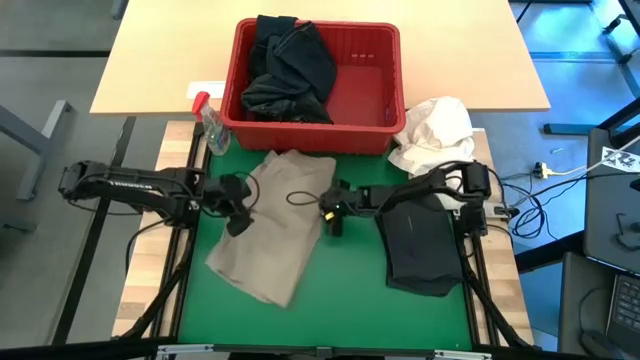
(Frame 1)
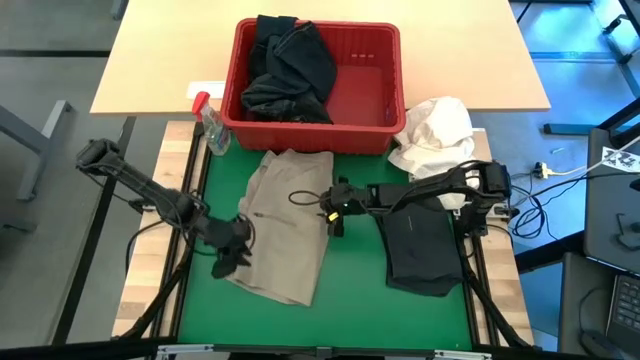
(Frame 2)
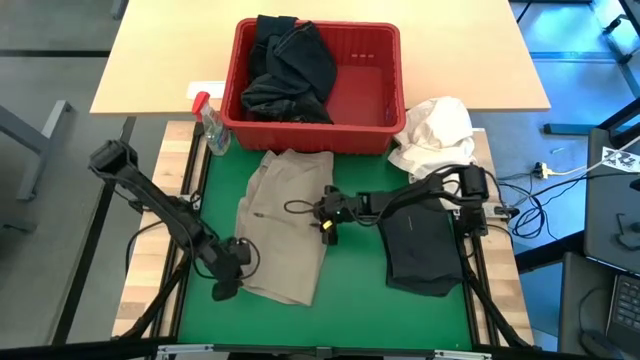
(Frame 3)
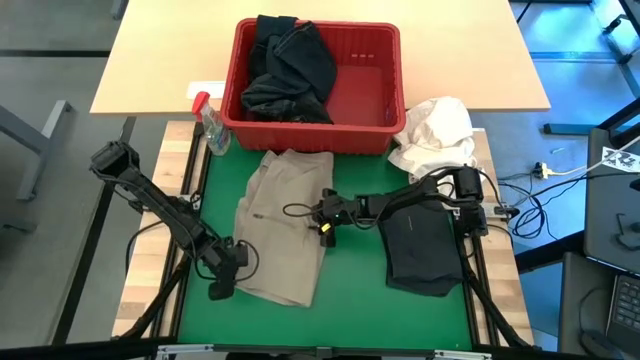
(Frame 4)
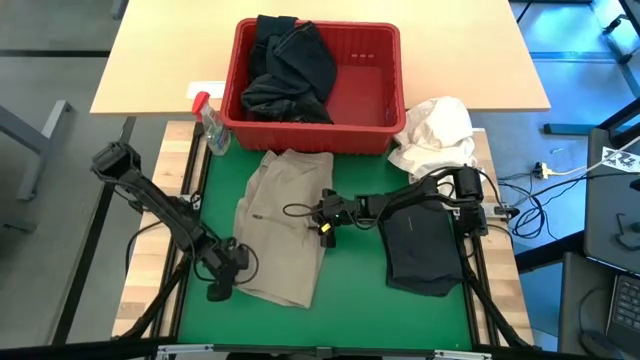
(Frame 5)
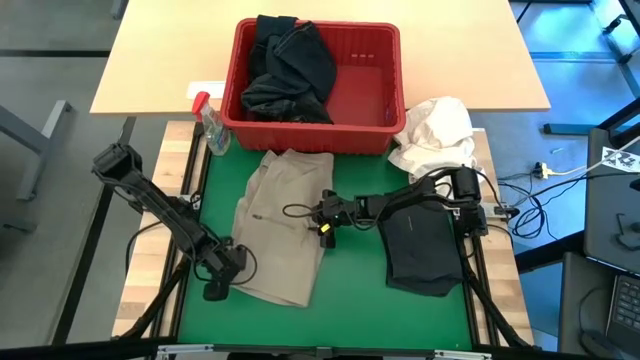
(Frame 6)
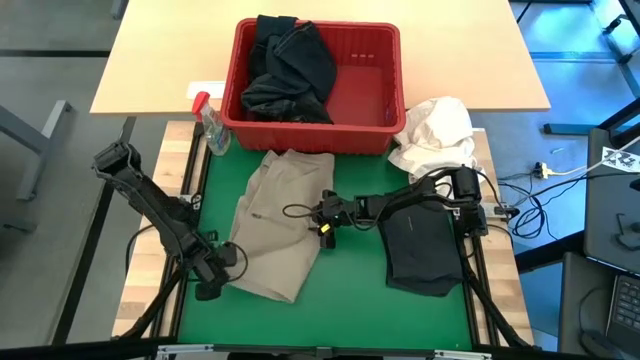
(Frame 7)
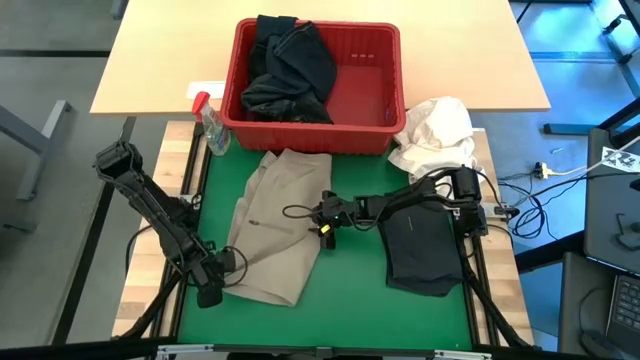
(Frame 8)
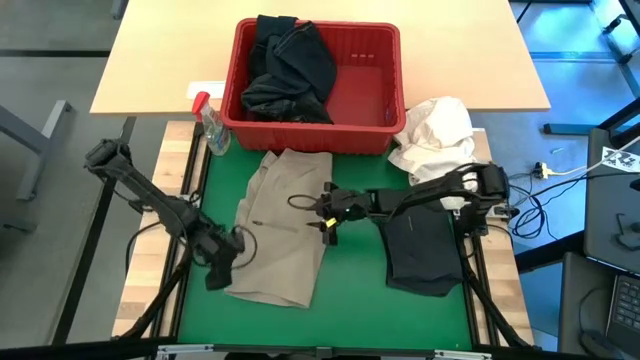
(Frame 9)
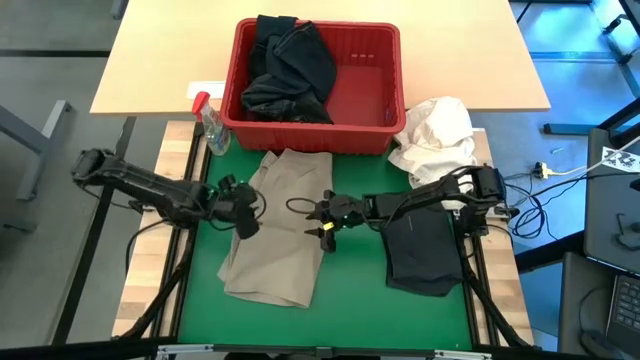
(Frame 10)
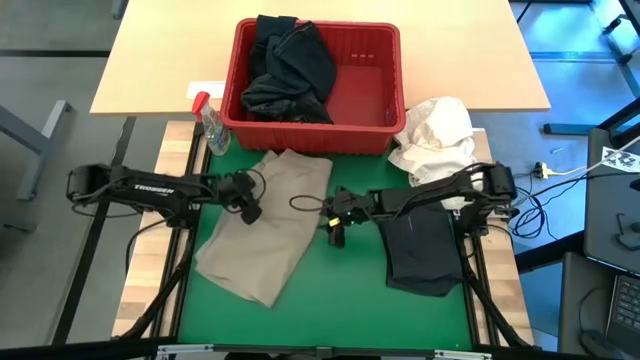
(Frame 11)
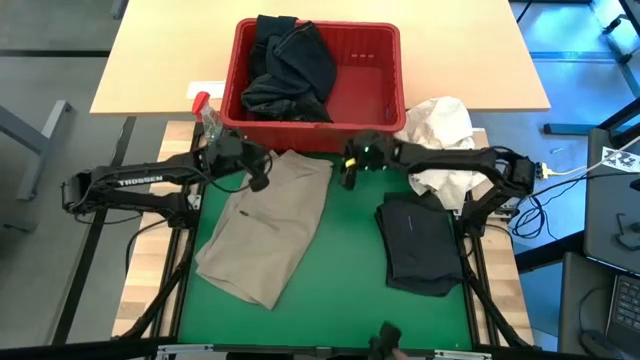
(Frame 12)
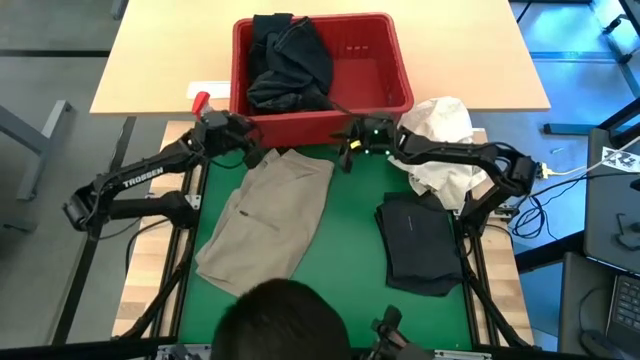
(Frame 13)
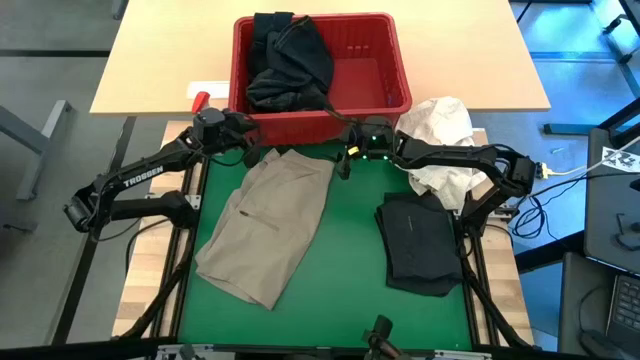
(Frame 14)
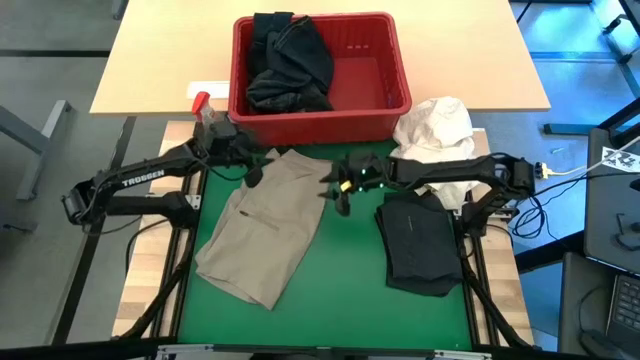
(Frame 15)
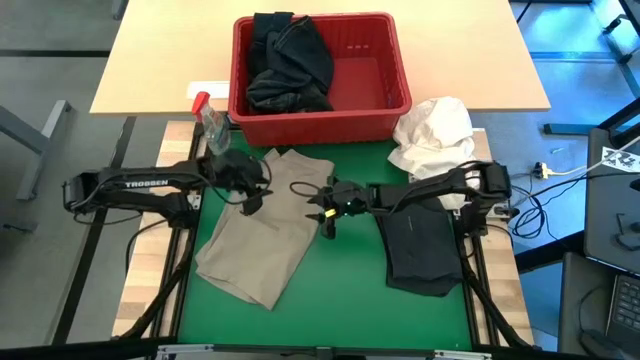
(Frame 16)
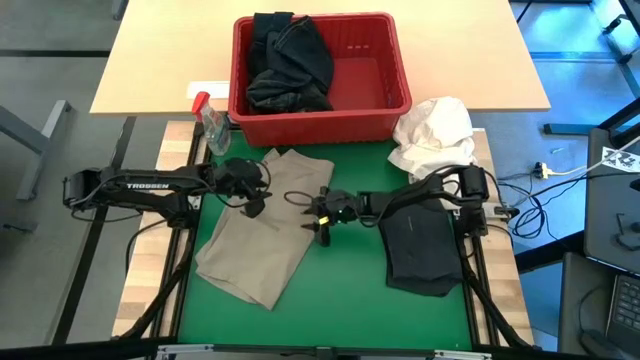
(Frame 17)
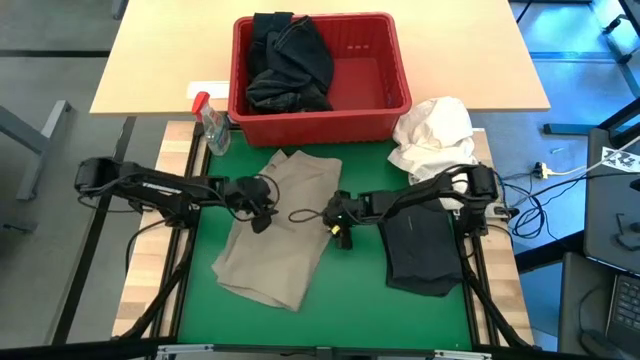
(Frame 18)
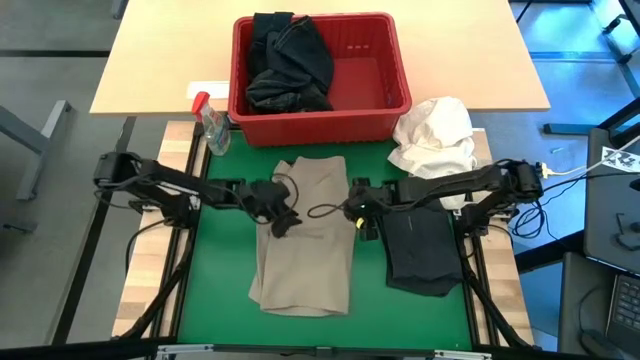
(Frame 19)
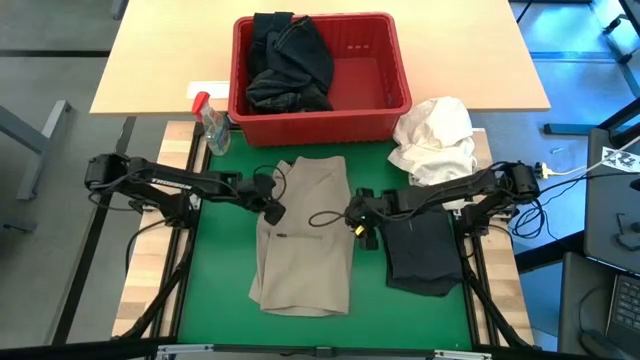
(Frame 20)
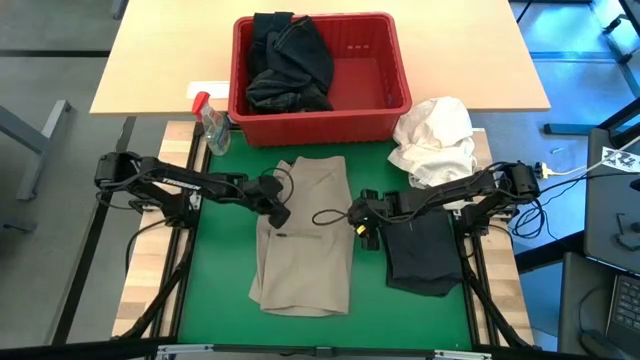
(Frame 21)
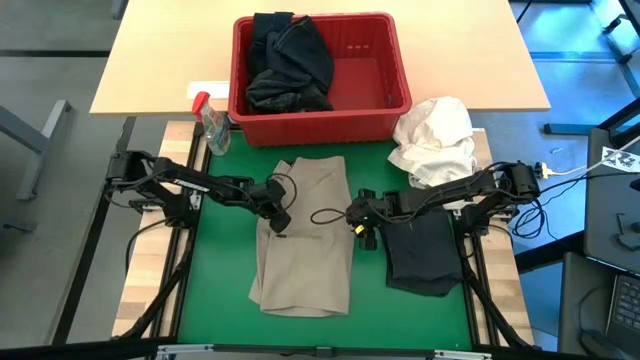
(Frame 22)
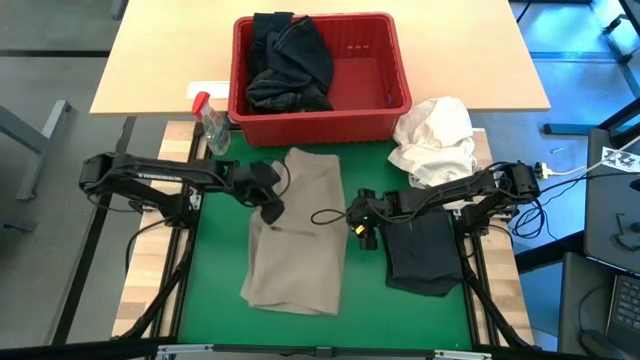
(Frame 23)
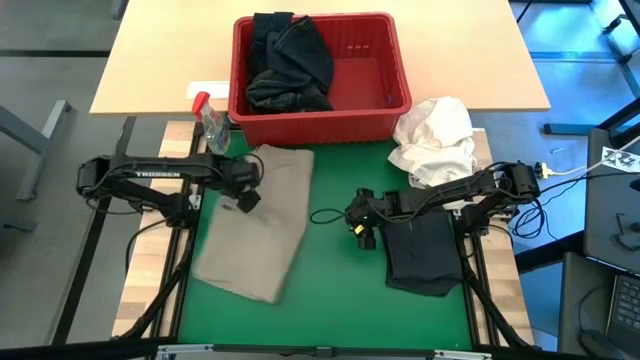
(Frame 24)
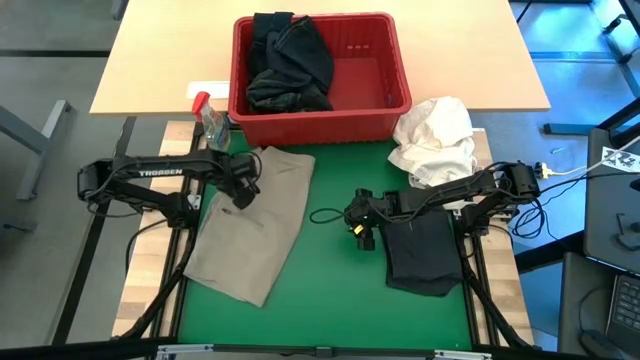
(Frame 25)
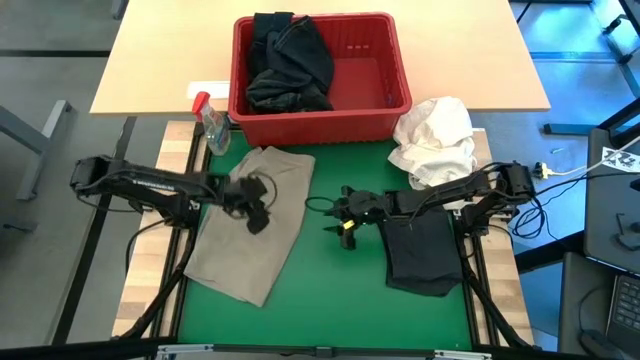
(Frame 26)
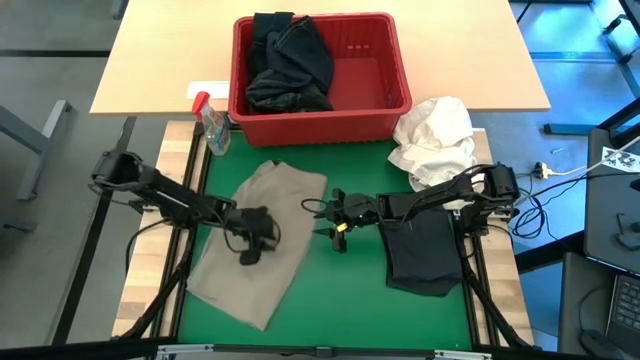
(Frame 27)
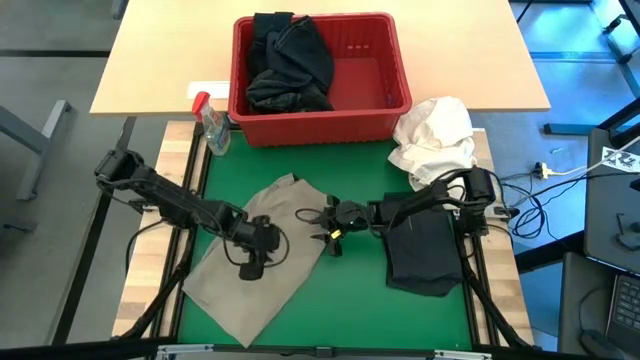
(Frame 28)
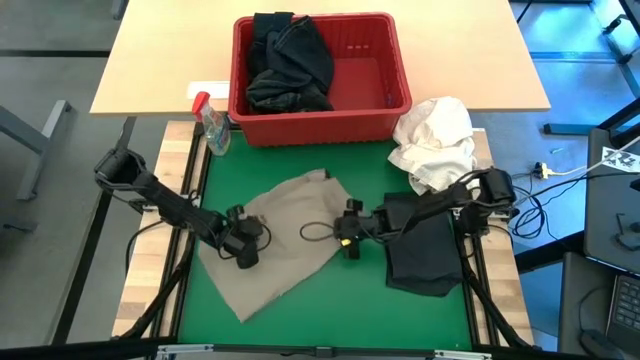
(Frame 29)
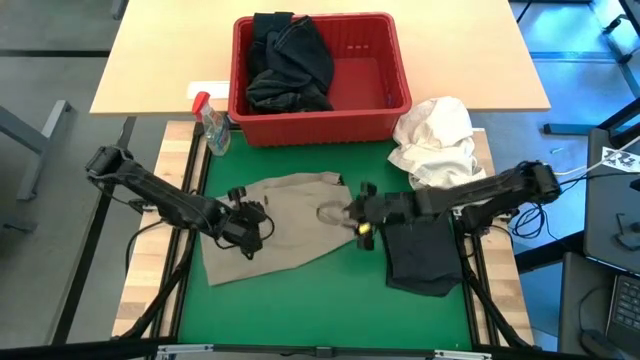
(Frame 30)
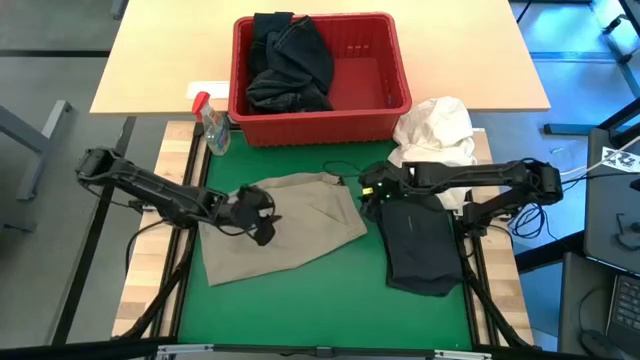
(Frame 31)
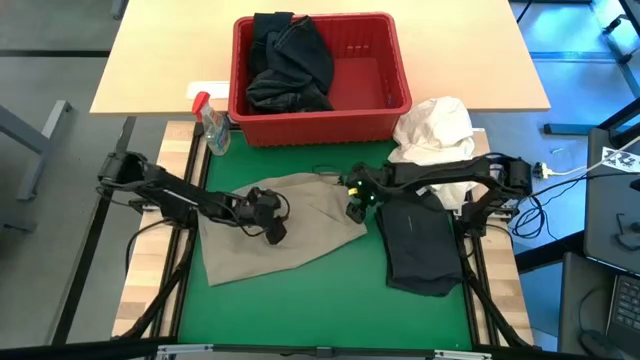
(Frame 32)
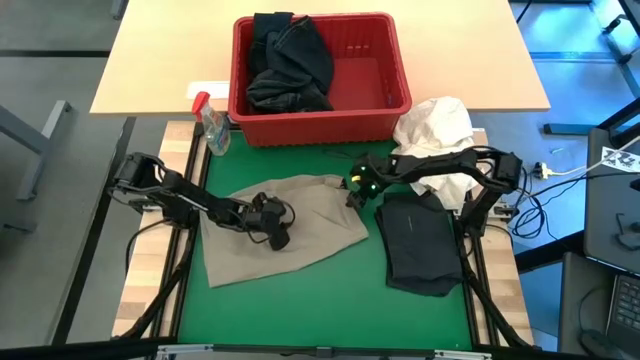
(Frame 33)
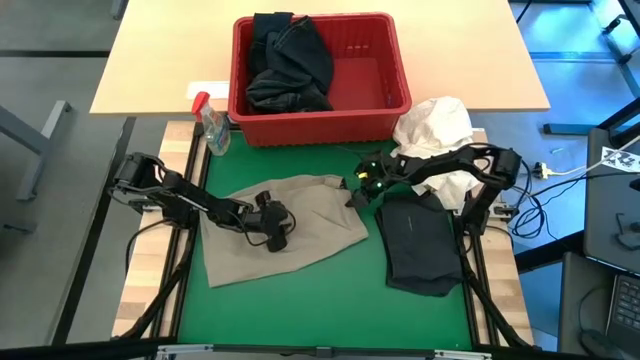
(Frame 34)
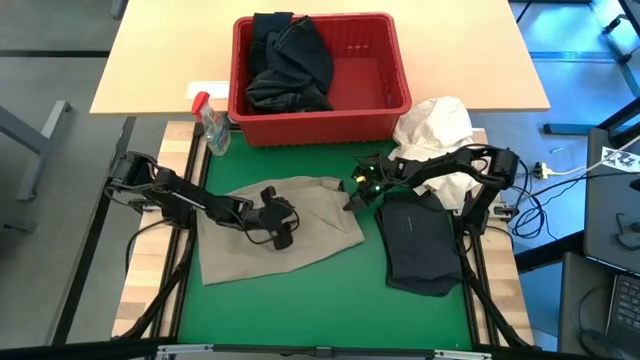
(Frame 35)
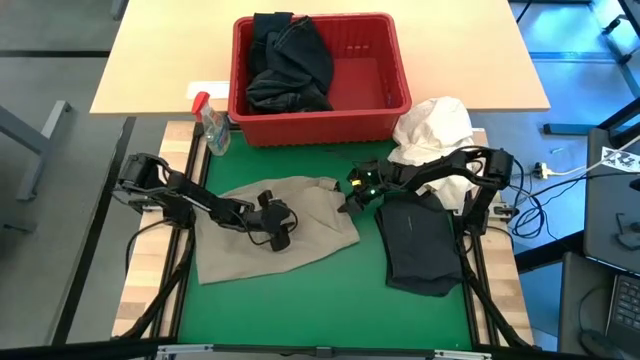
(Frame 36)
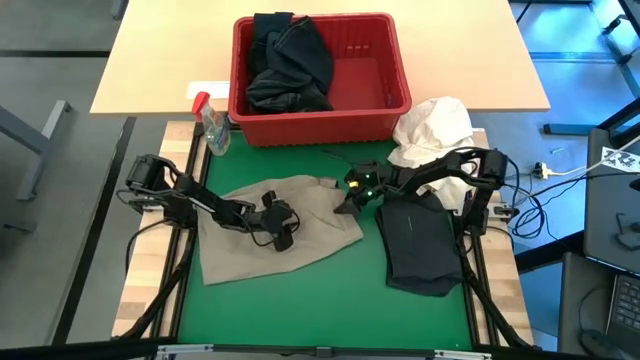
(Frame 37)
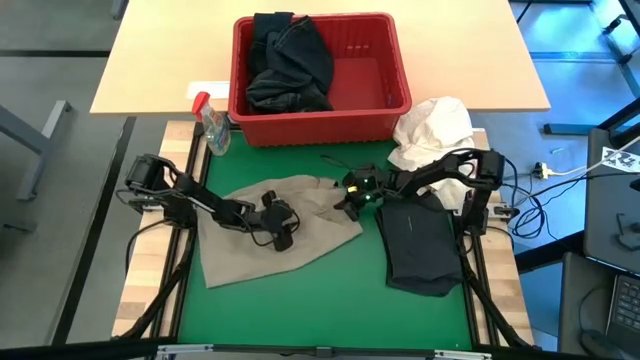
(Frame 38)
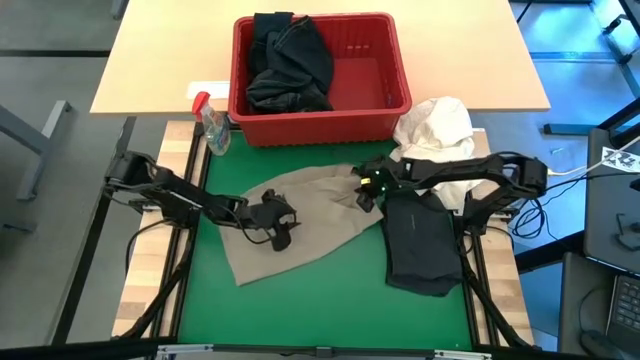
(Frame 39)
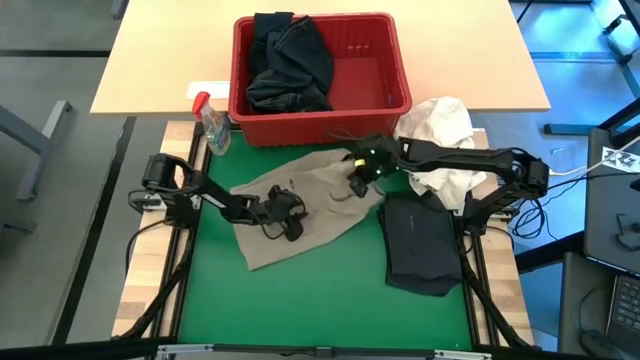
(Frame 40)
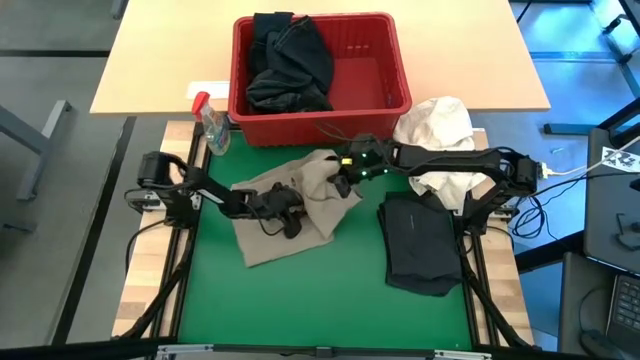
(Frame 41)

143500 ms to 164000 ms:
Task: Fold Laundry from Bin
Fold the brown shorts
